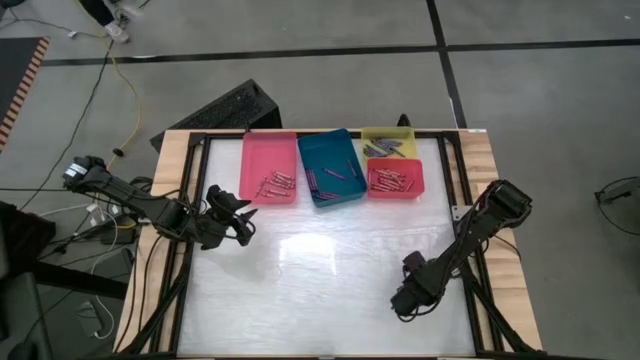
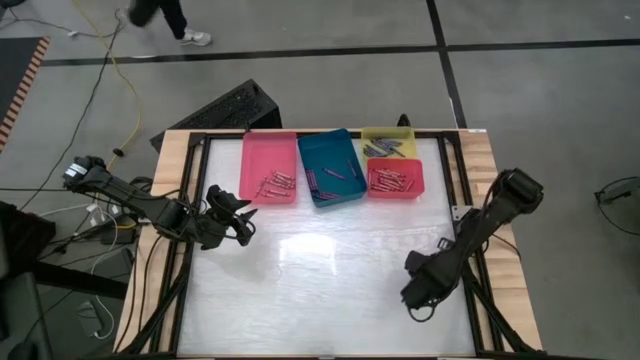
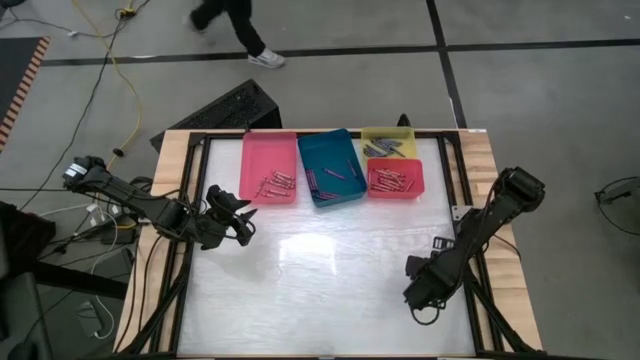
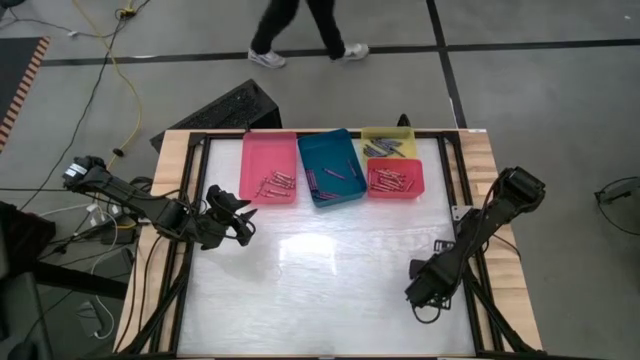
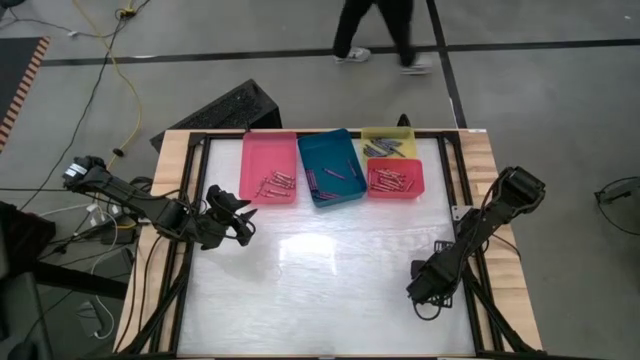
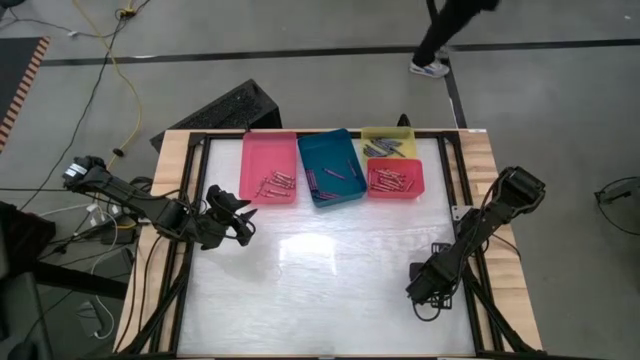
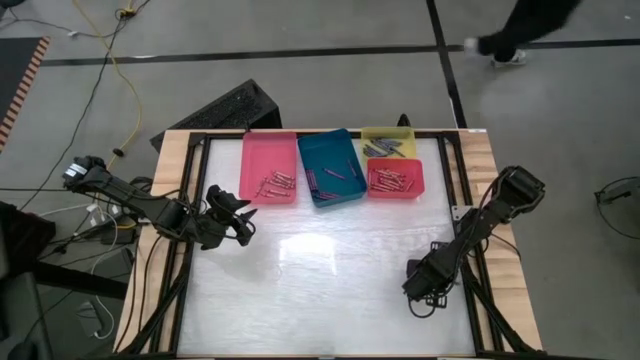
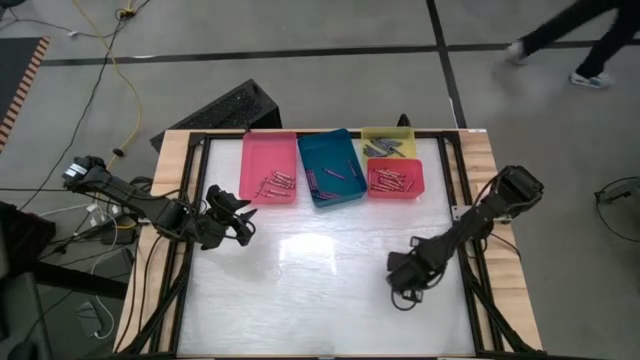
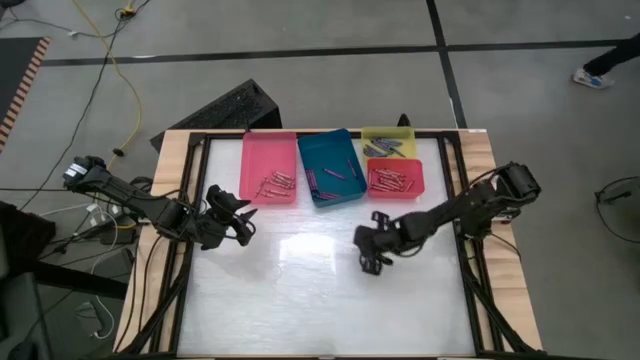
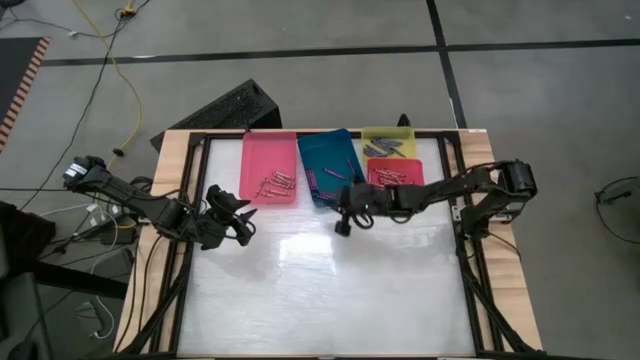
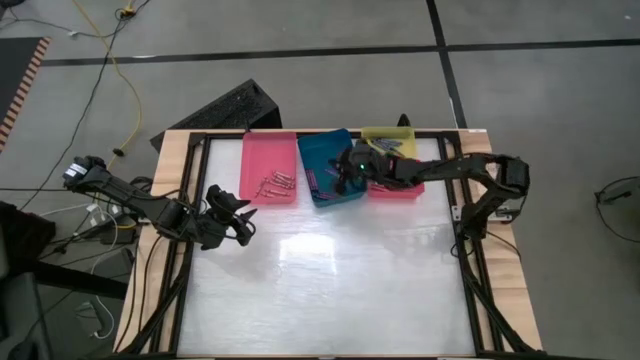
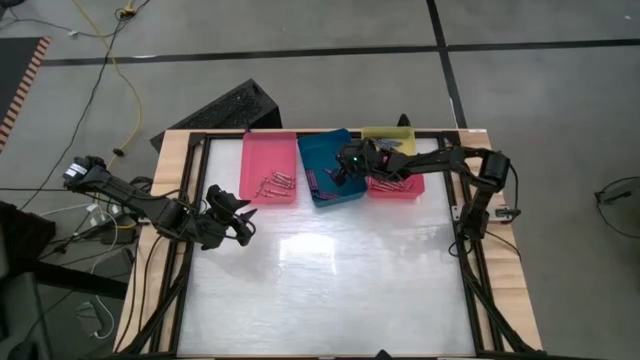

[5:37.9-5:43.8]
Task: Sort crayons
Put the violet crayon into the blue bin

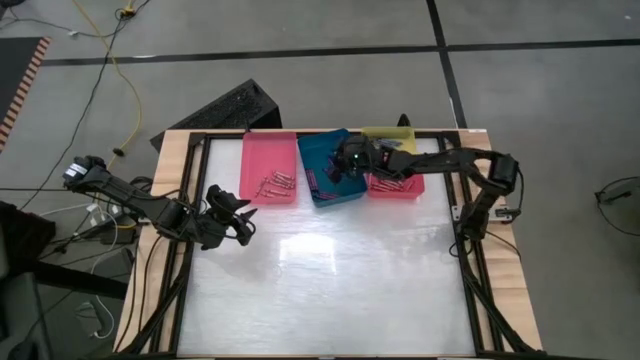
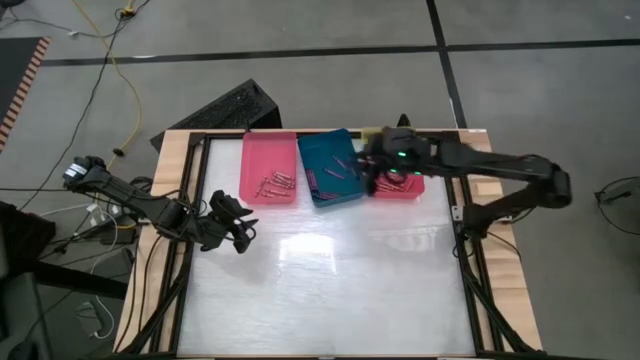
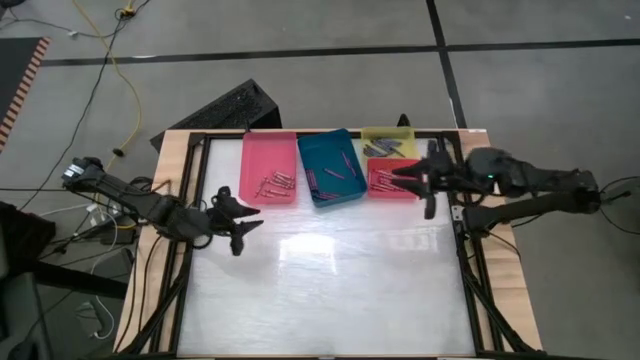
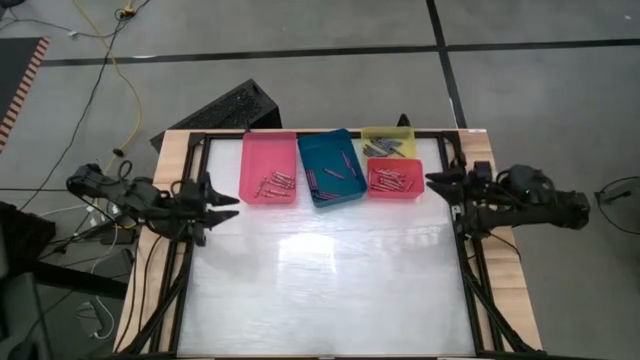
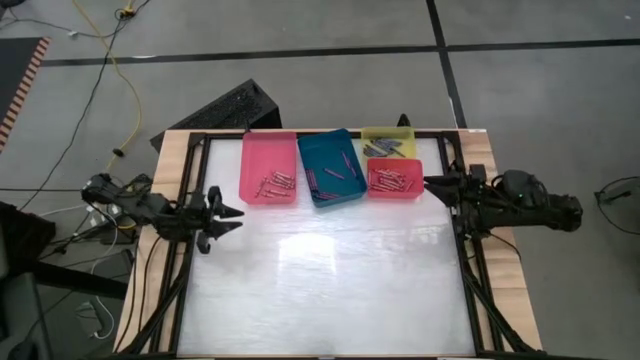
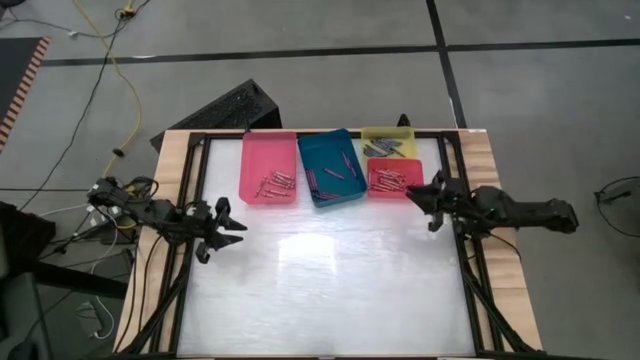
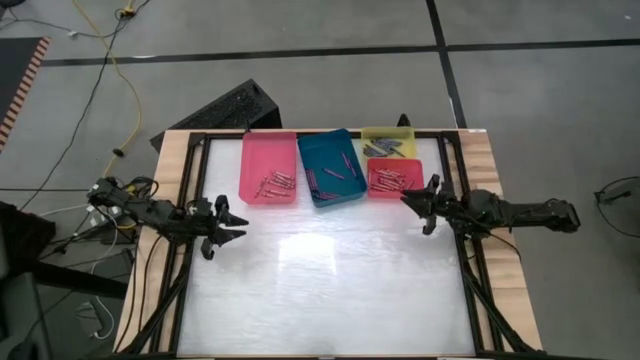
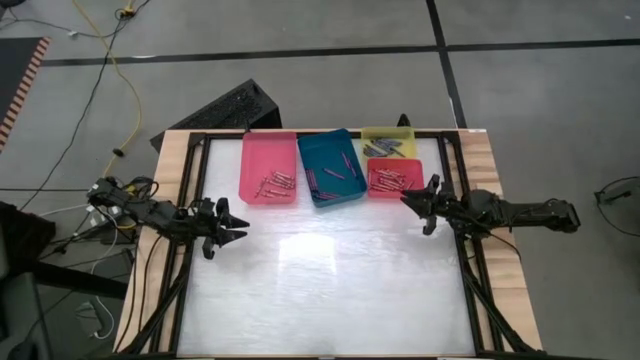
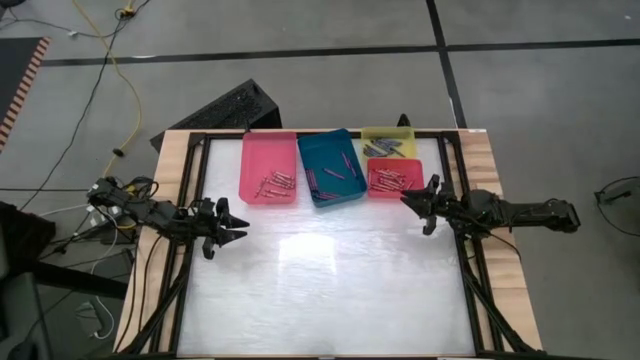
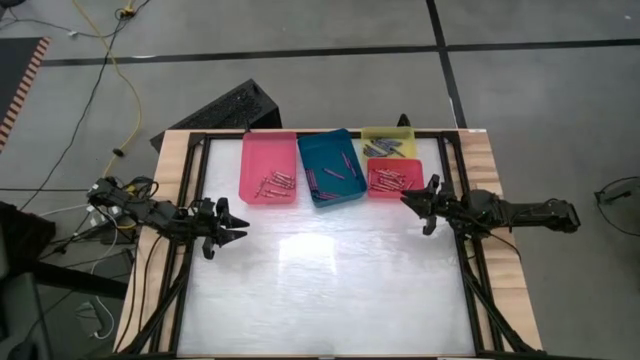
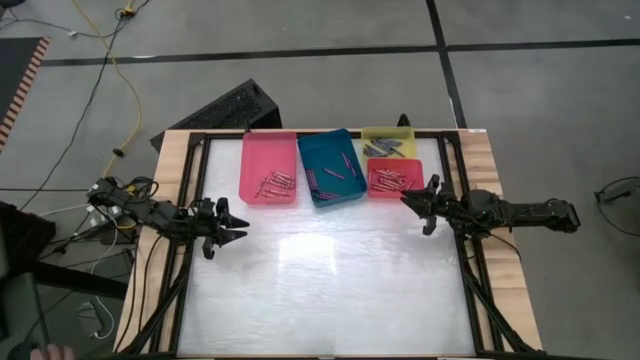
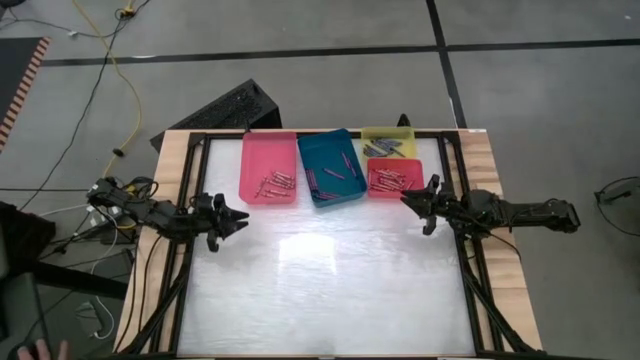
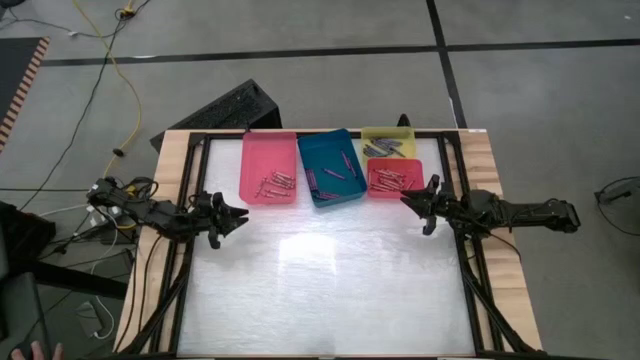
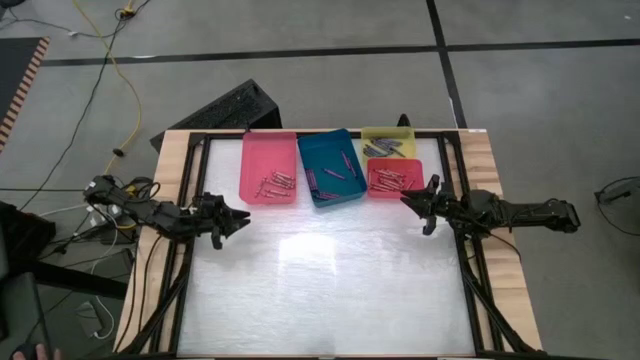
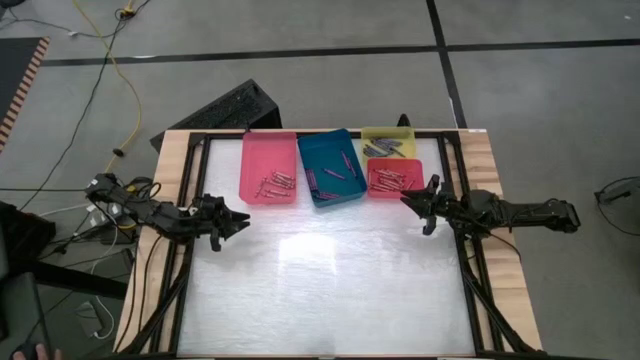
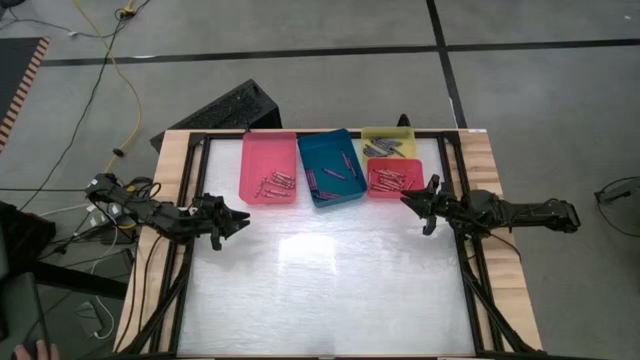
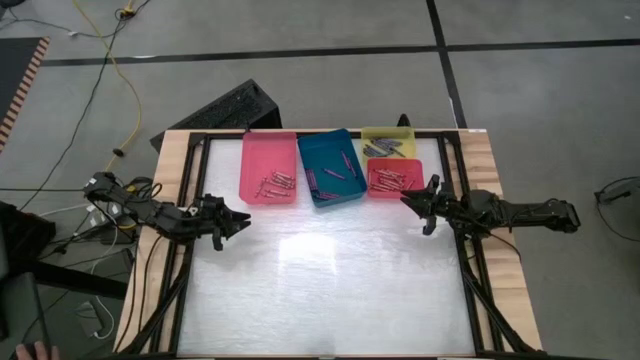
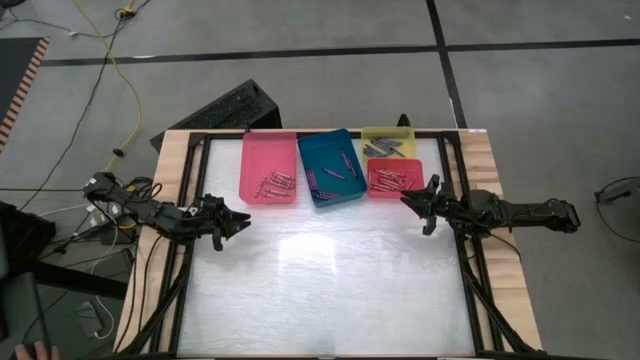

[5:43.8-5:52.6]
Return to Home Position

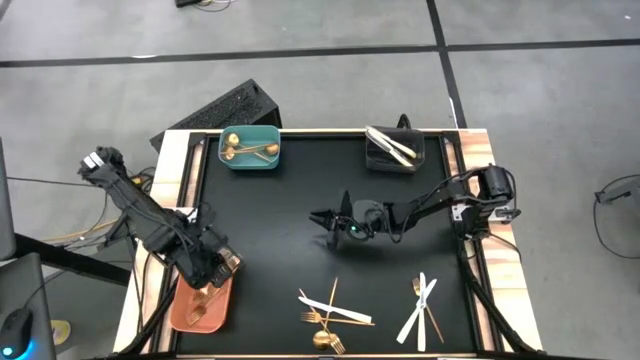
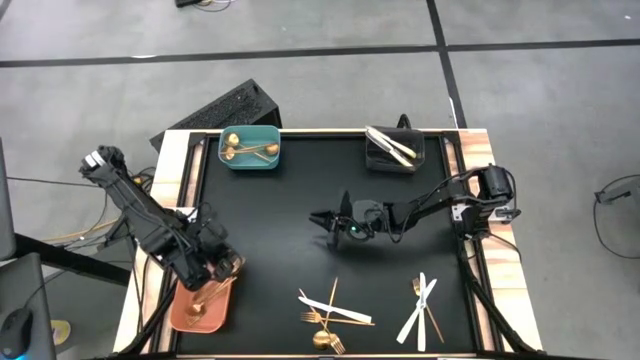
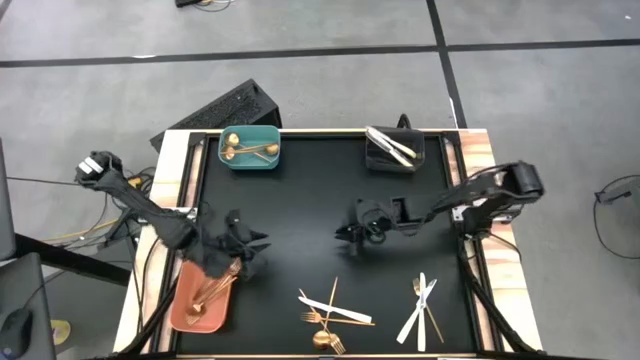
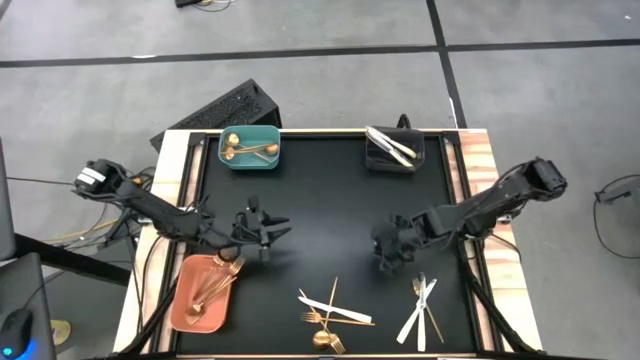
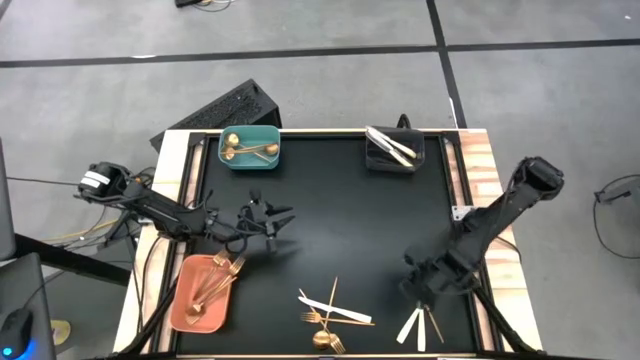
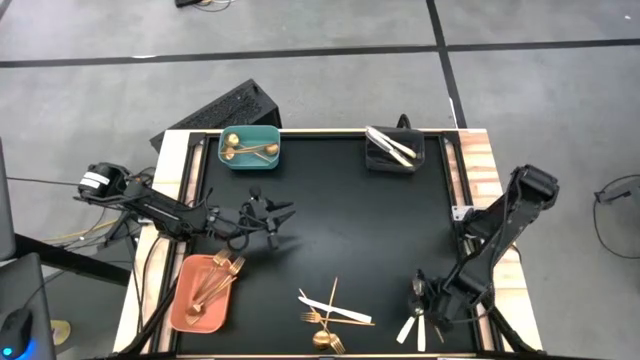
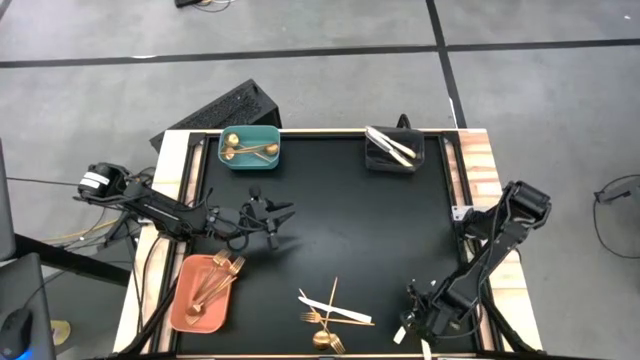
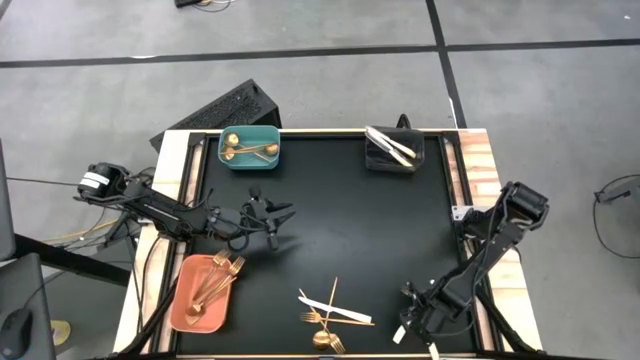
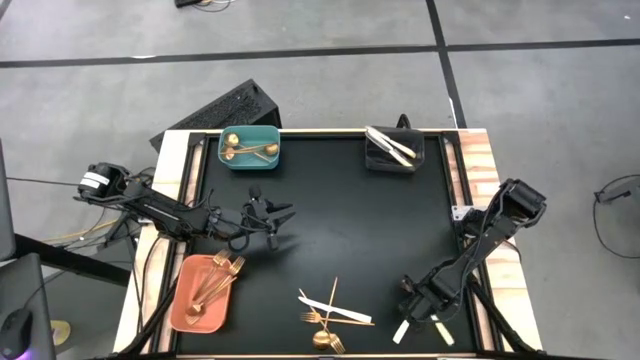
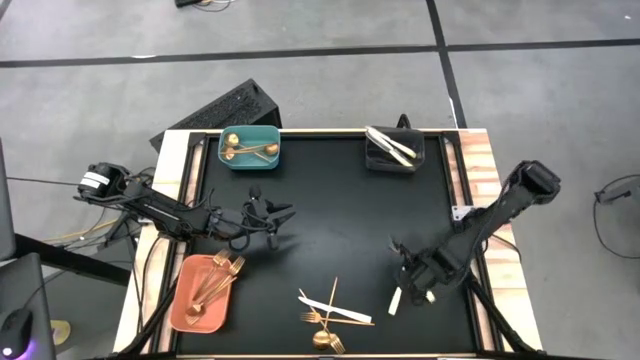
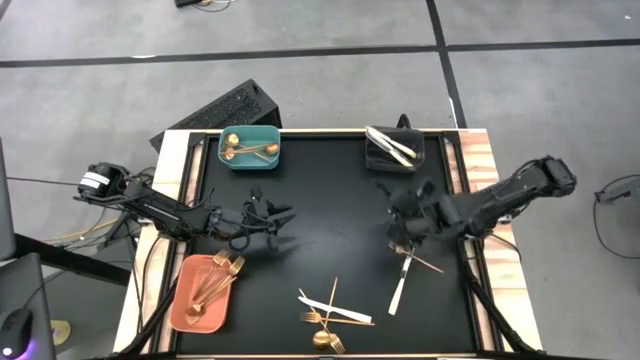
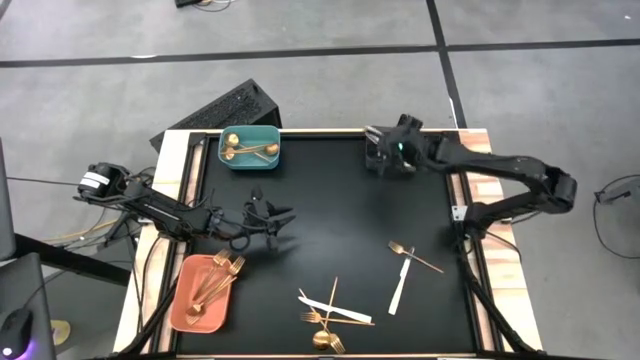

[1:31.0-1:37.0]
Task: Sort silverware by color (type)
Put the white knife into the black bin

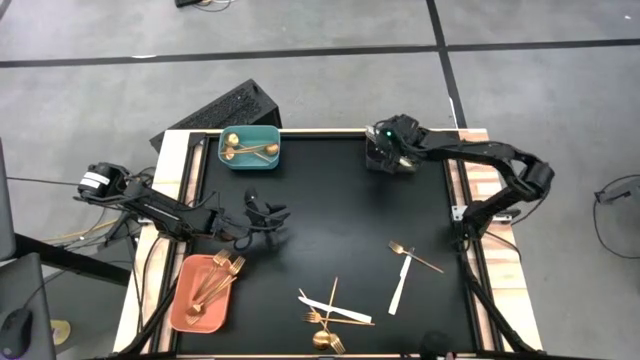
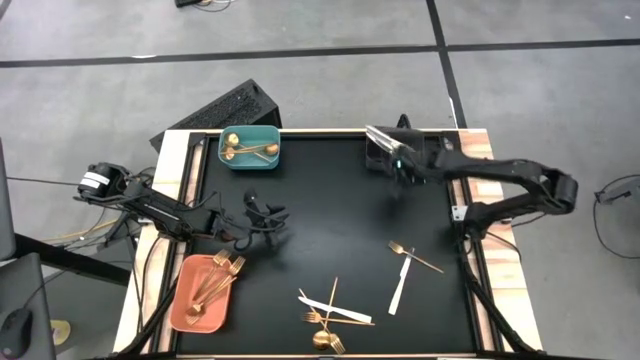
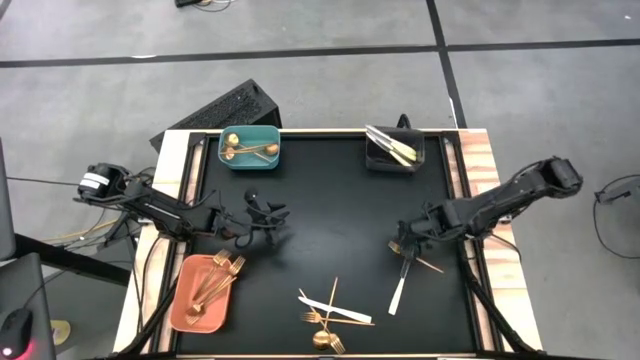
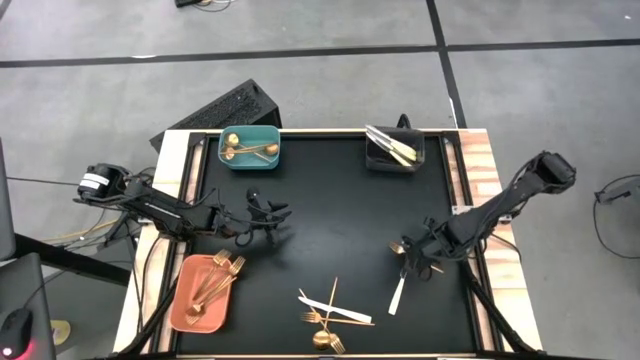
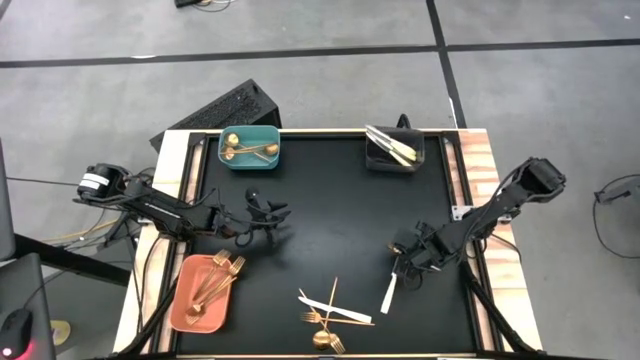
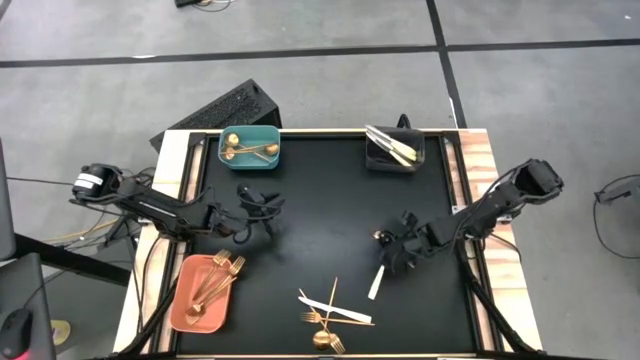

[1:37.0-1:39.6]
Put the gold fork into the orange bin
